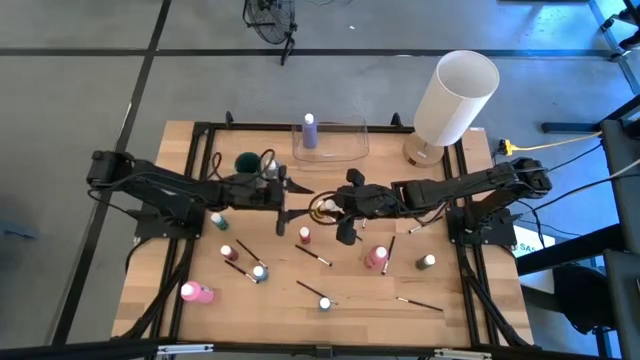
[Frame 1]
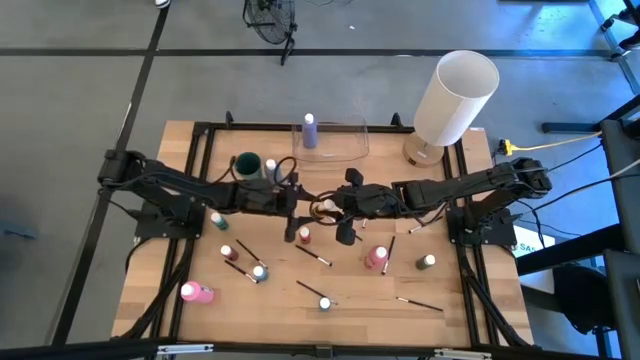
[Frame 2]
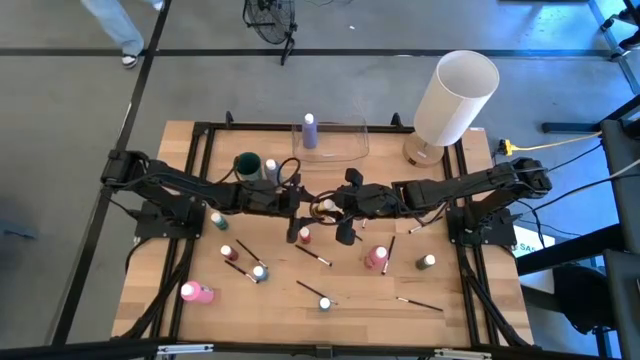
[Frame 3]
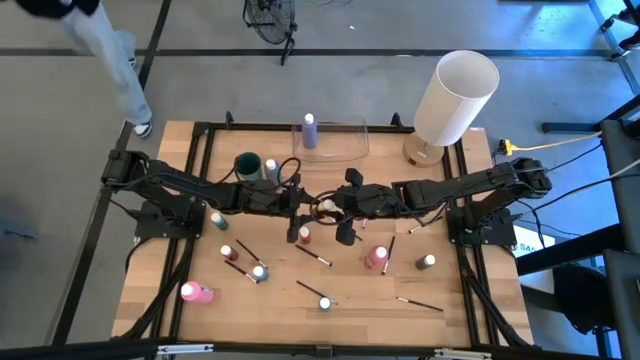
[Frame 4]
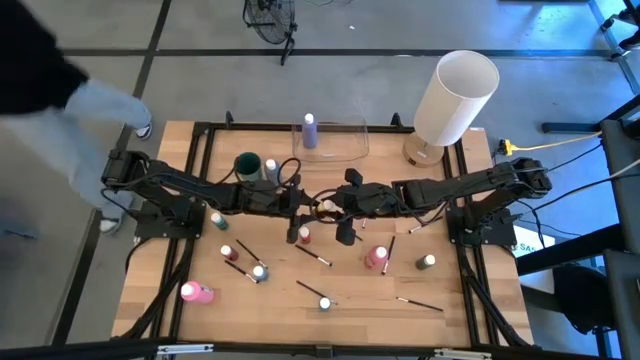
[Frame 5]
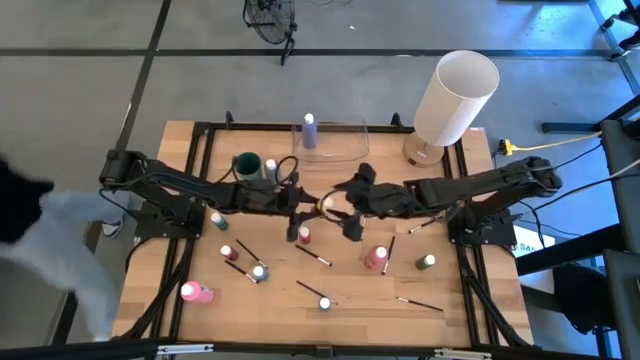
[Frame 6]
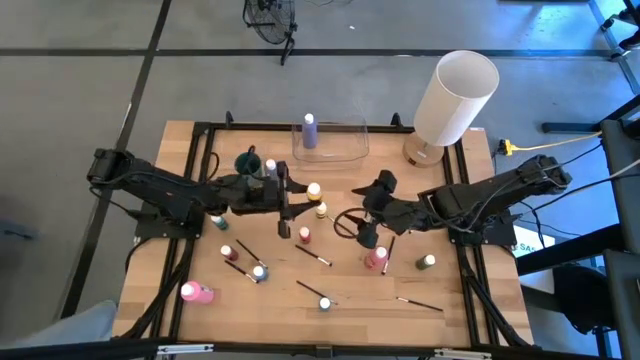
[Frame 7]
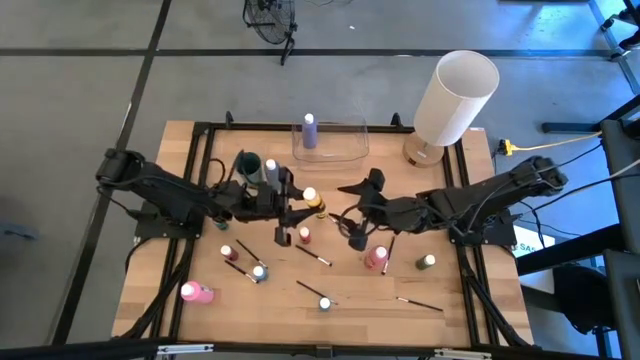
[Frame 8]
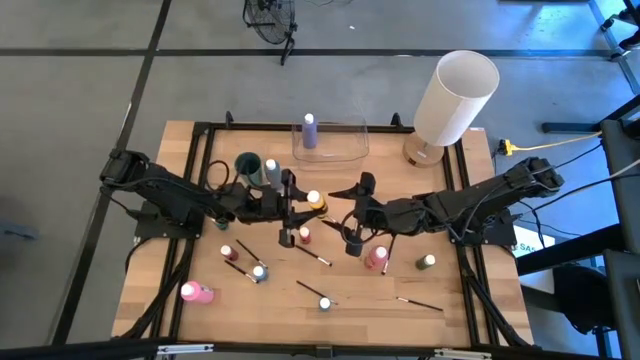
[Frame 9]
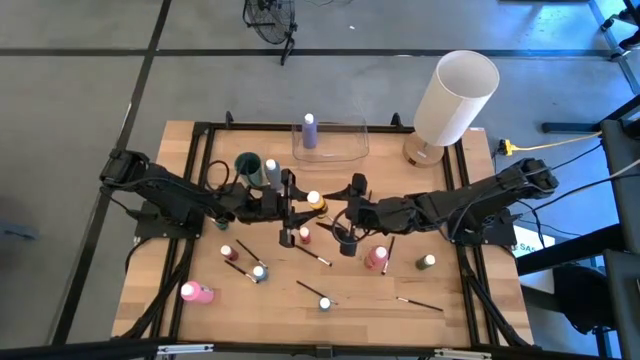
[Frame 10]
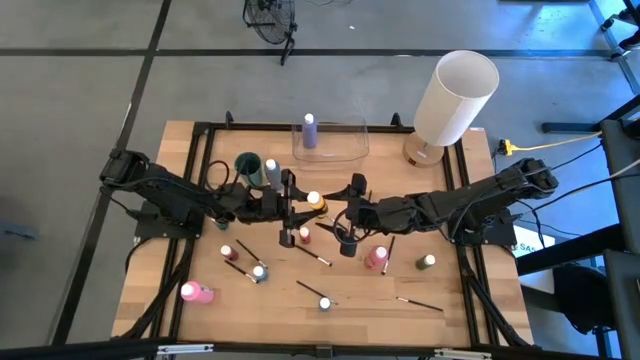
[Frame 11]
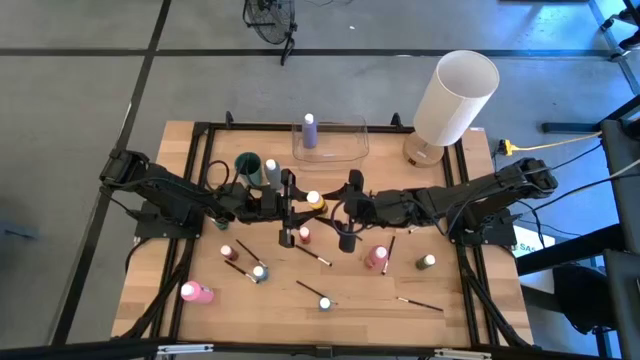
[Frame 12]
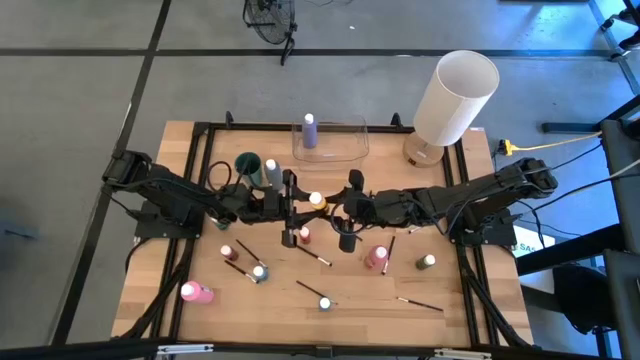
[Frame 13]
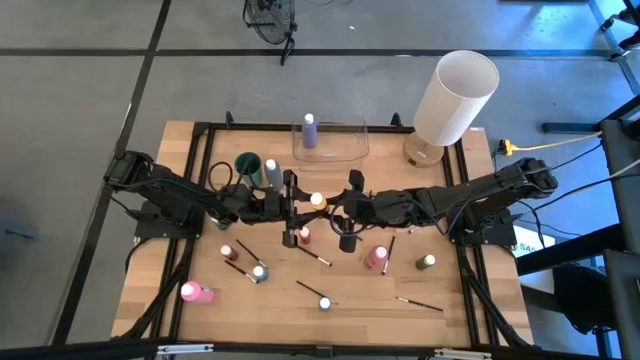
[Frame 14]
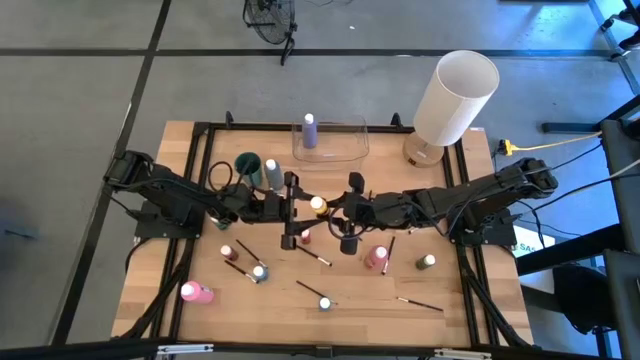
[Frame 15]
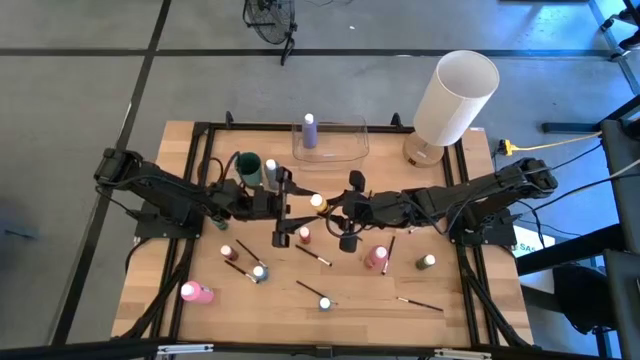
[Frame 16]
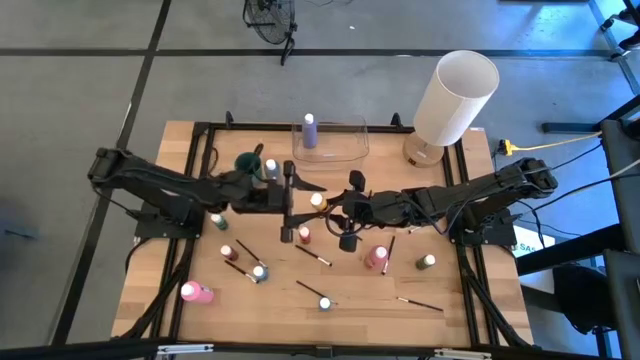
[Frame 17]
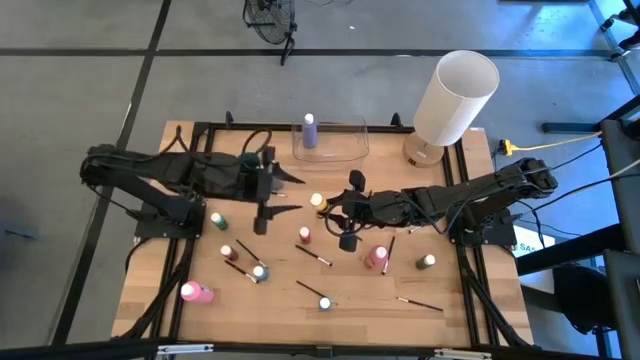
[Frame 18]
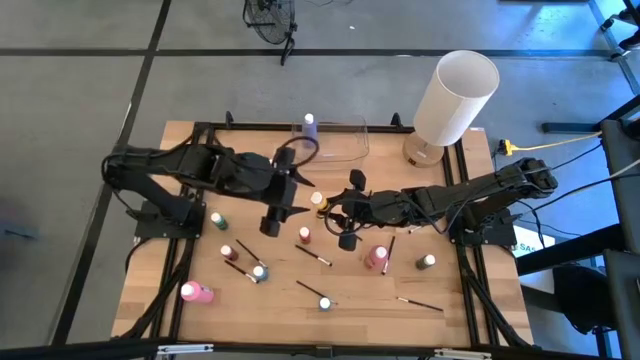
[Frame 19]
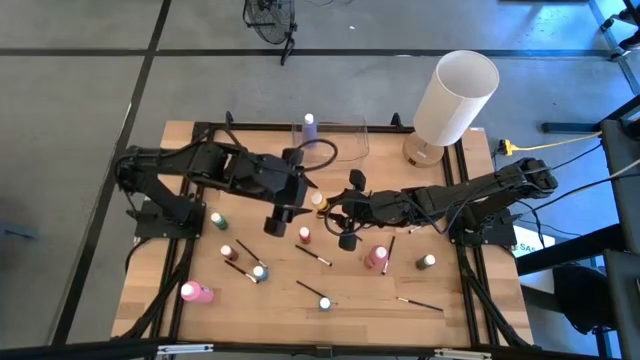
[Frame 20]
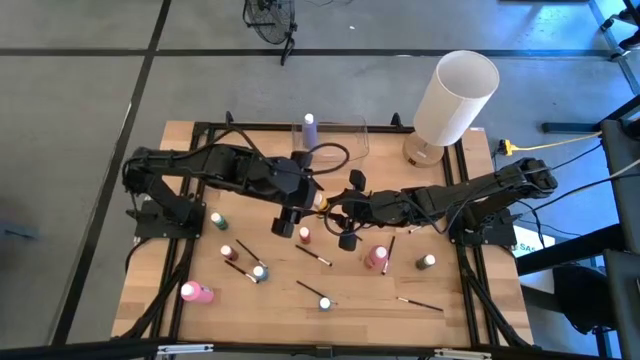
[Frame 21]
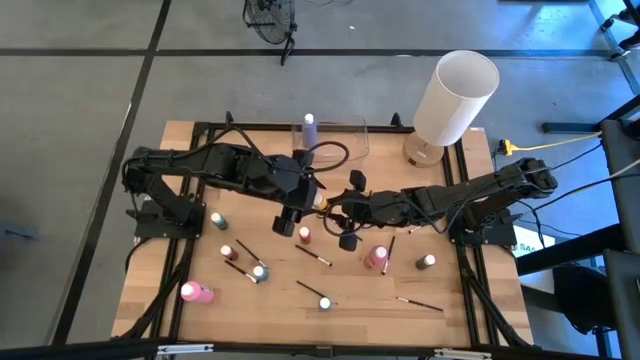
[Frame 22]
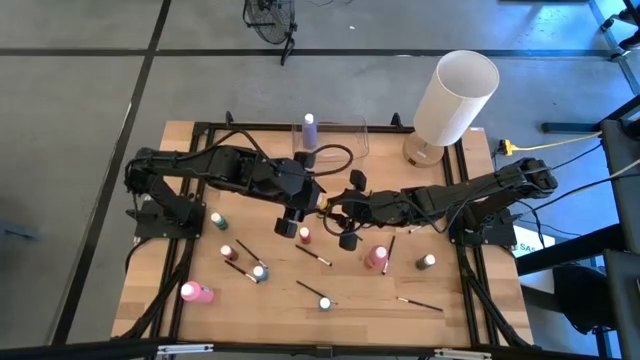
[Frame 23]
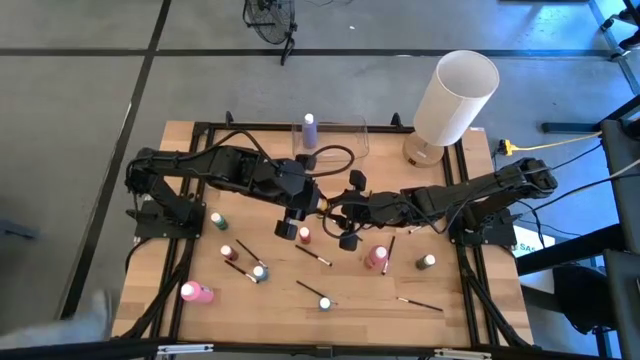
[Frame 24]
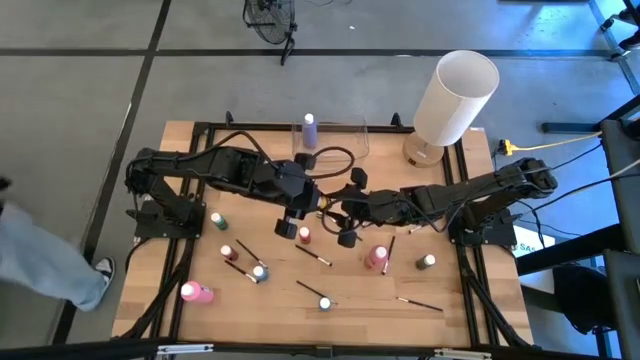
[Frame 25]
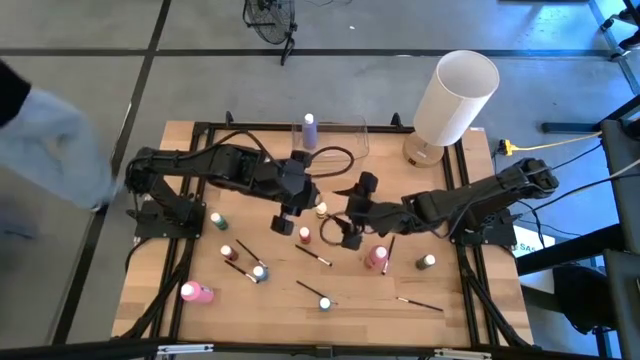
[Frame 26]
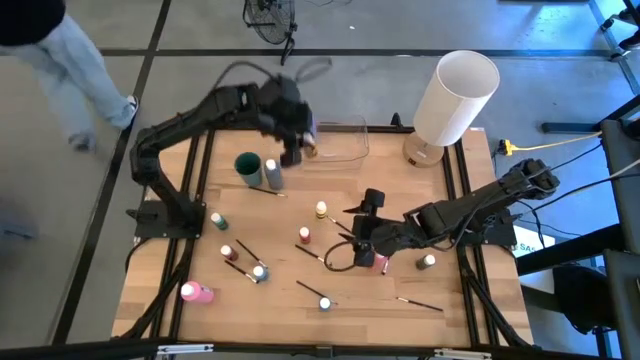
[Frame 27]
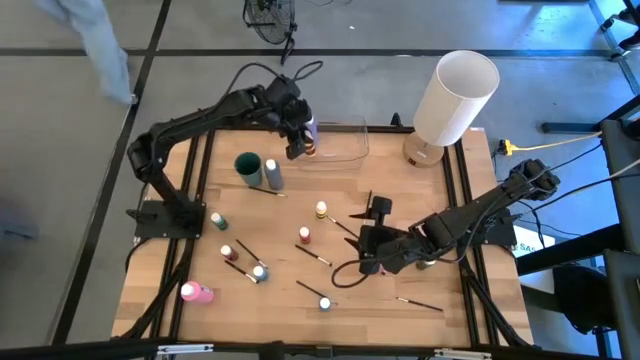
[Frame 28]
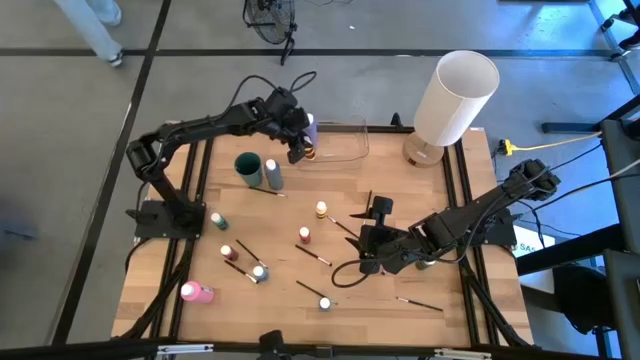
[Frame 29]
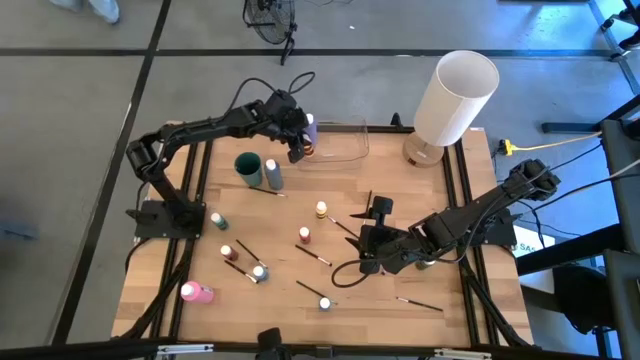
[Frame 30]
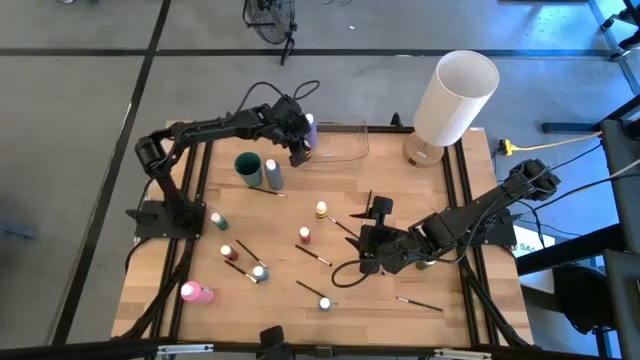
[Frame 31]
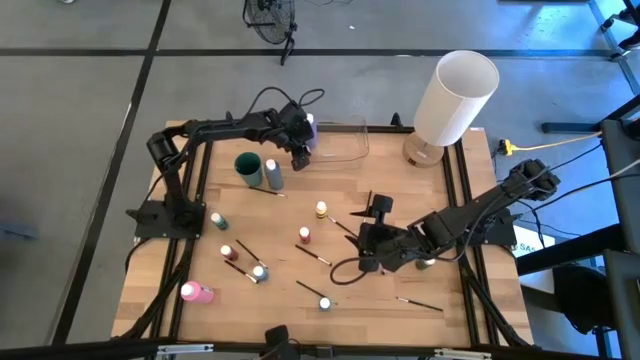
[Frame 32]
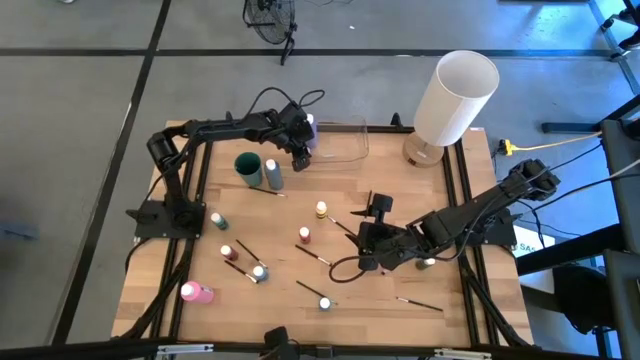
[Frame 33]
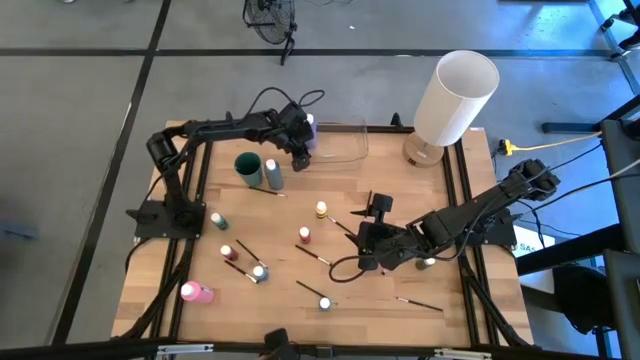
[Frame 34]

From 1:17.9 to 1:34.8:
Task: Pick & Place Paint Supplies
Put the yellow paint bottle into the transparent bin

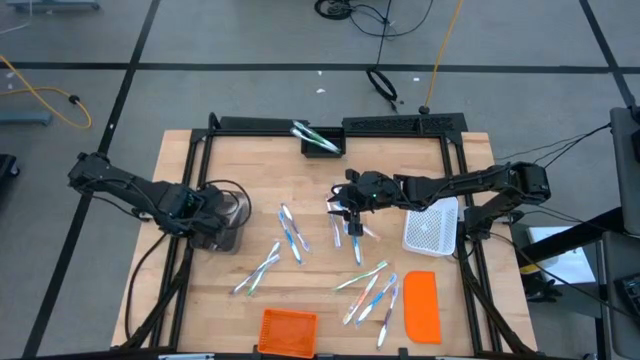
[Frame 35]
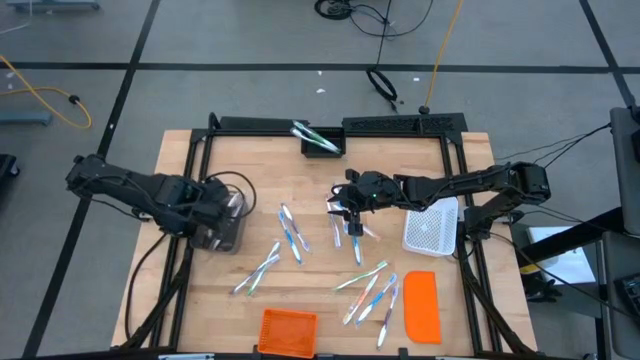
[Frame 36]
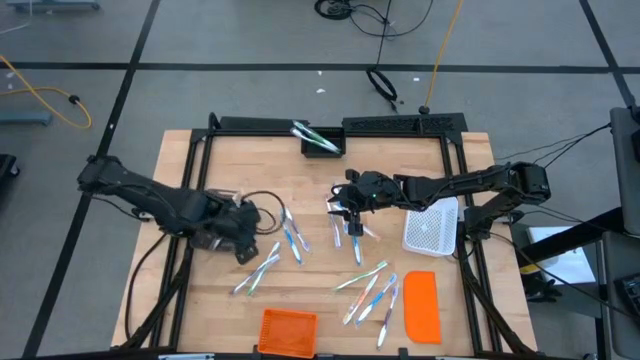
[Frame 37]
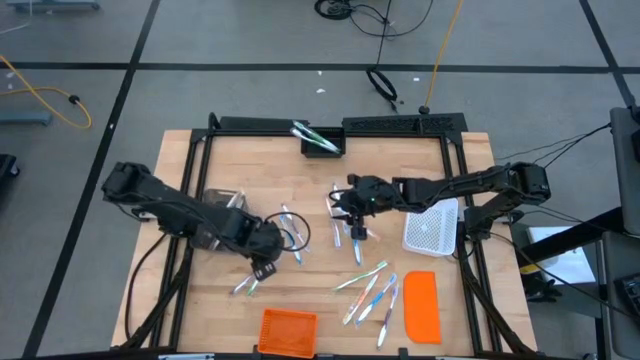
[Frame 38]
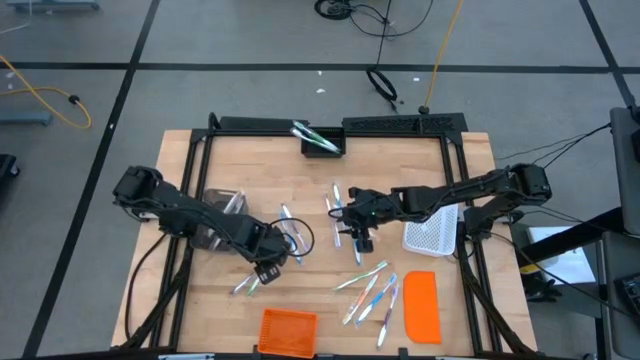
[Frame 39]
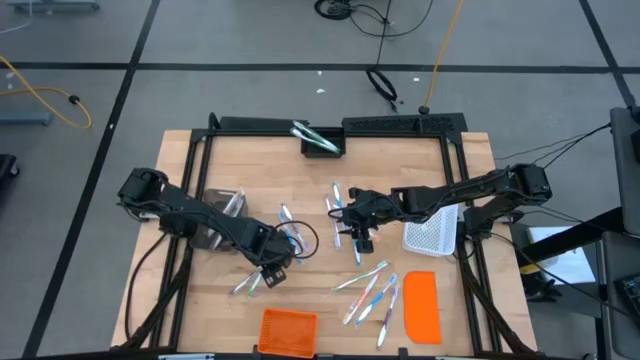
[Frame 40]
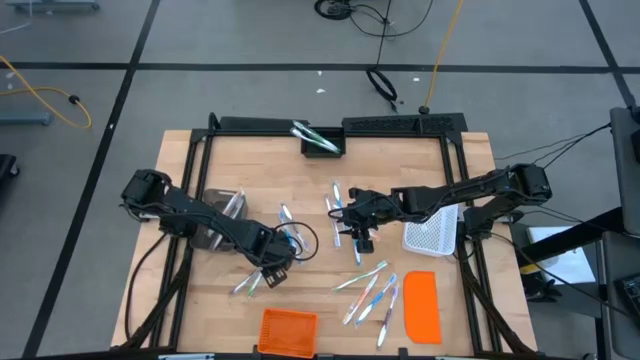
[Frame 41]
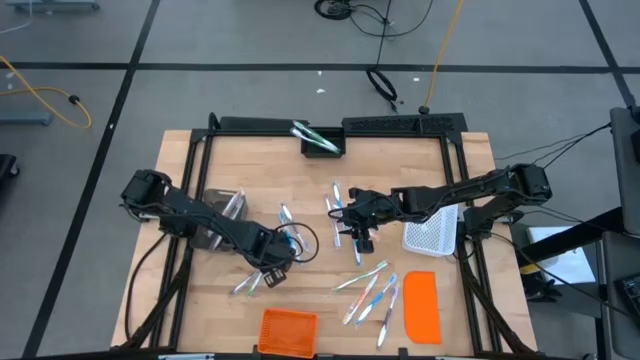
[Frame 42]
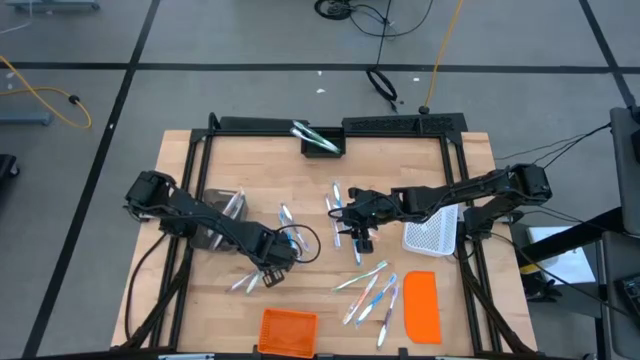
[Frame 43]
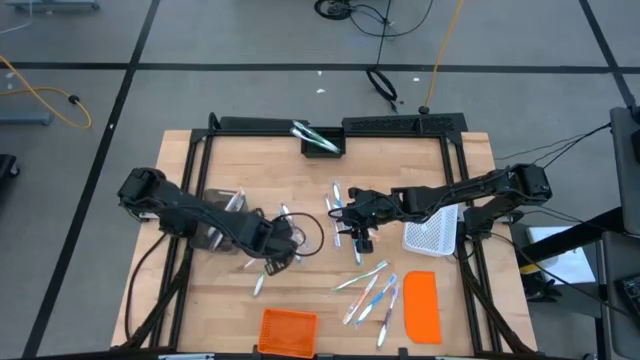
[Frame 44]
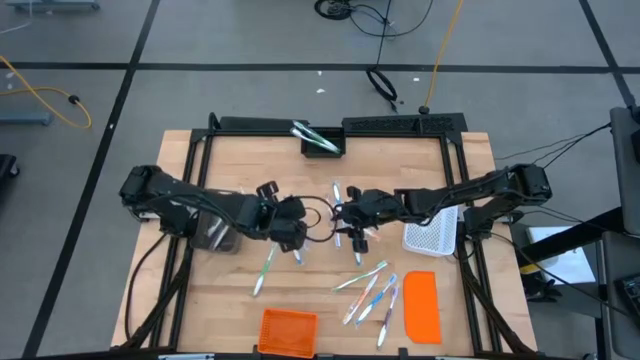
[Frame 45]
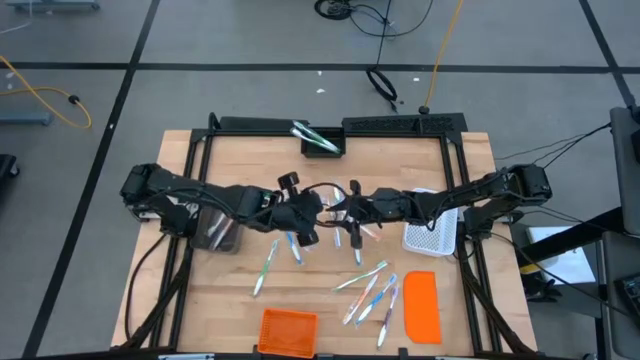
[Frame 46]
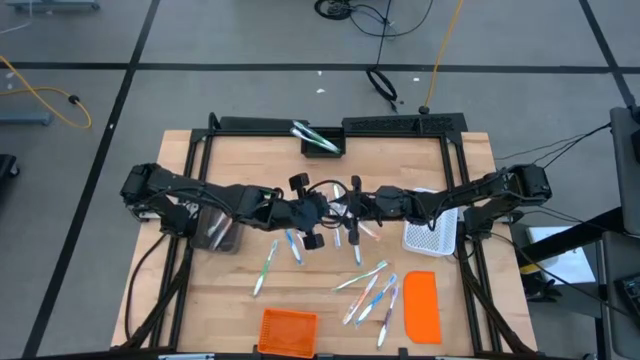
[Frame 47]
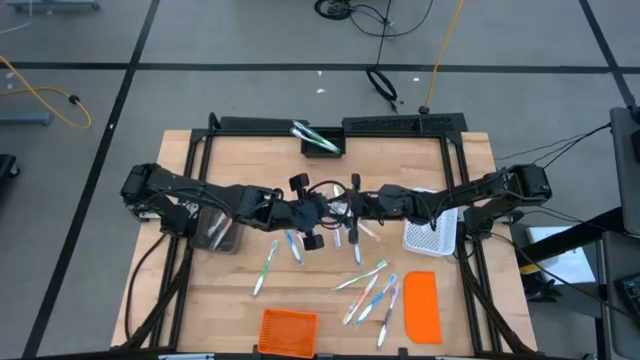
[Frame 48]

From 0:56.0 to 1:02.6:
Task: Pick & Place Toothbrushes
Put the purple toothbrush into the white bin
